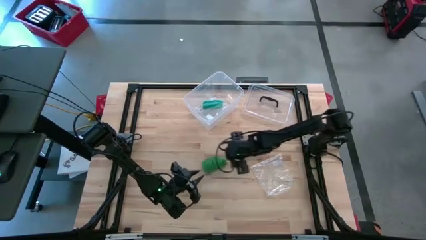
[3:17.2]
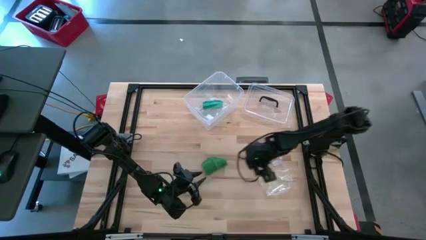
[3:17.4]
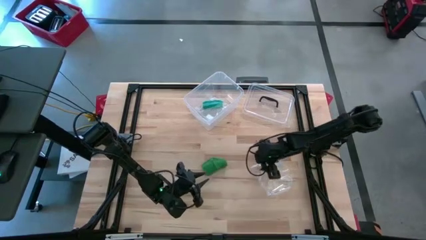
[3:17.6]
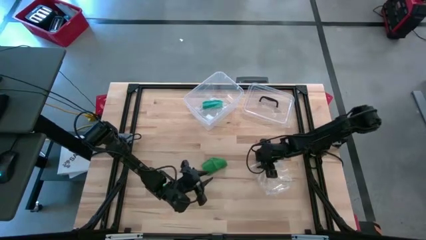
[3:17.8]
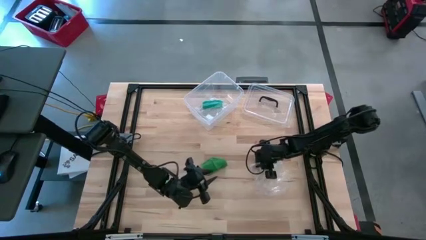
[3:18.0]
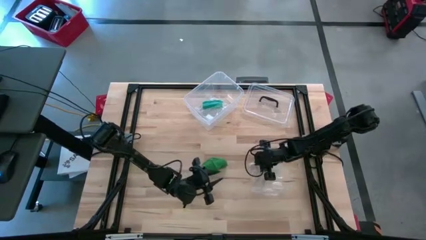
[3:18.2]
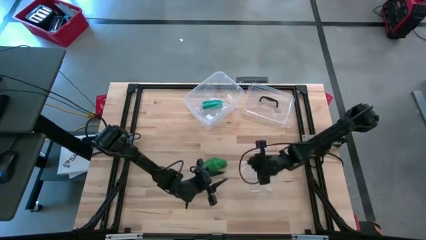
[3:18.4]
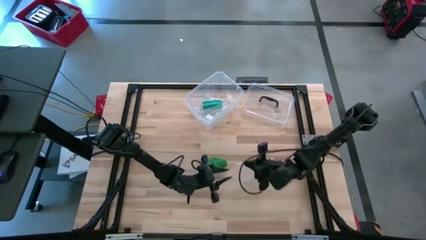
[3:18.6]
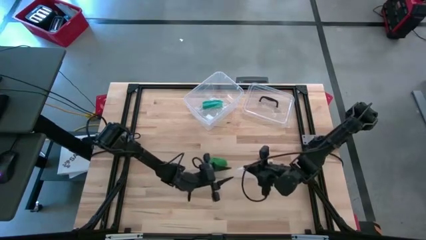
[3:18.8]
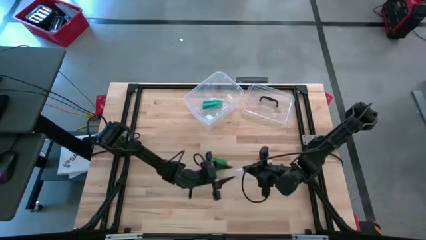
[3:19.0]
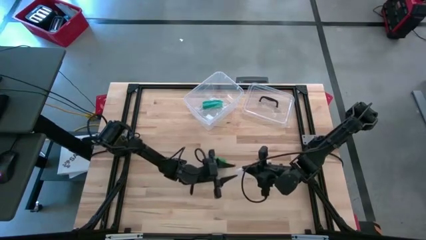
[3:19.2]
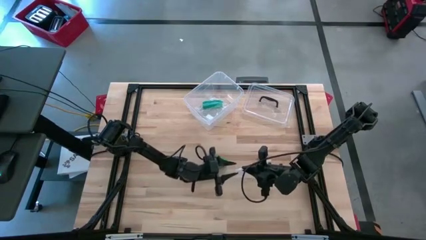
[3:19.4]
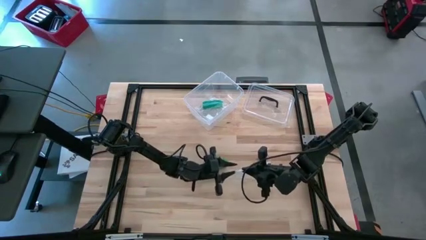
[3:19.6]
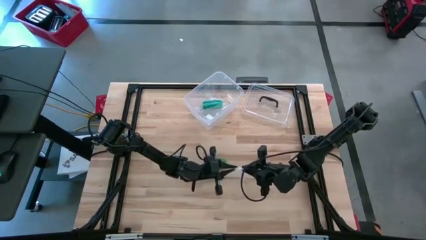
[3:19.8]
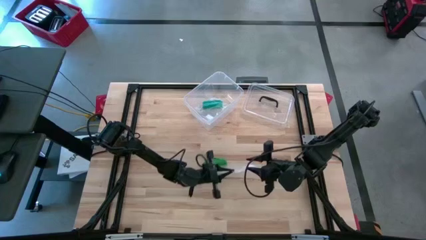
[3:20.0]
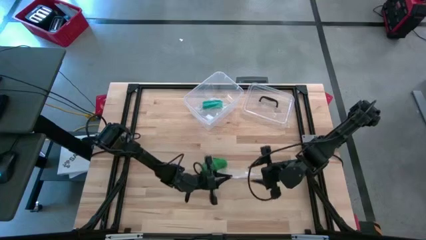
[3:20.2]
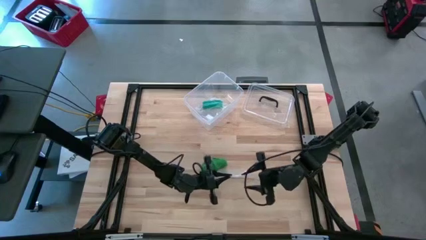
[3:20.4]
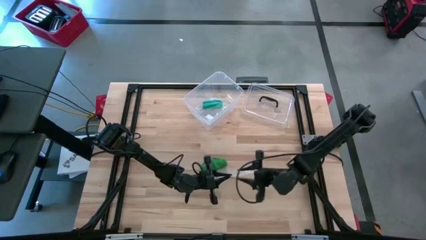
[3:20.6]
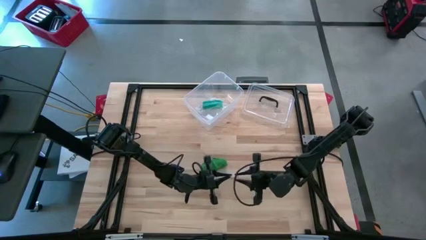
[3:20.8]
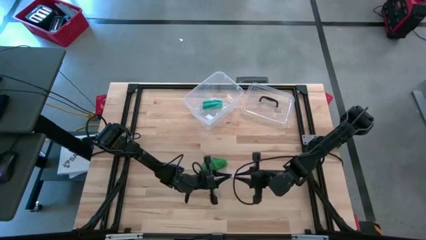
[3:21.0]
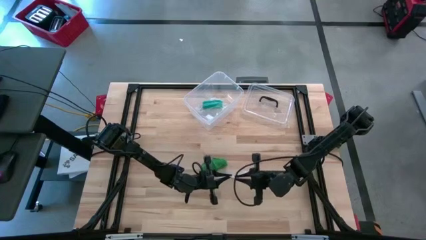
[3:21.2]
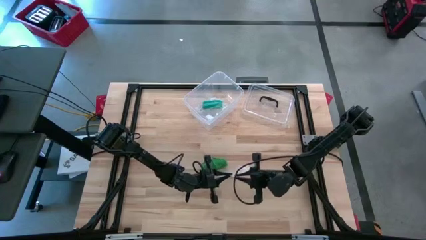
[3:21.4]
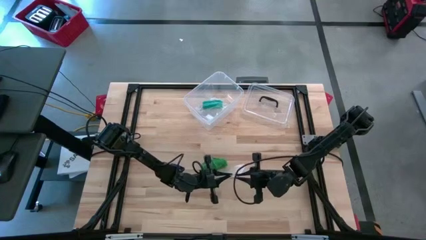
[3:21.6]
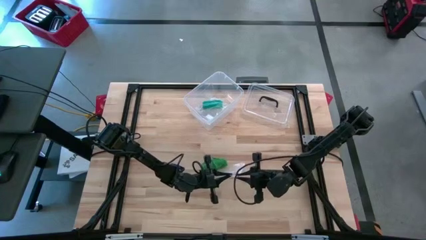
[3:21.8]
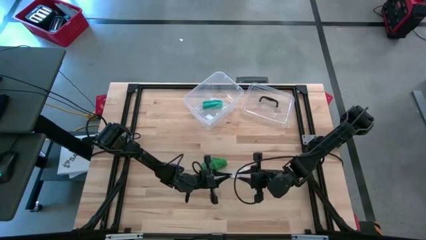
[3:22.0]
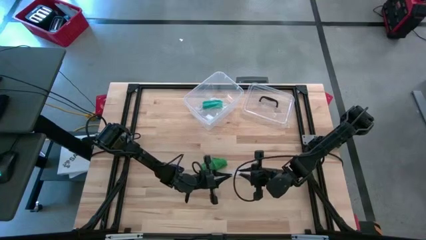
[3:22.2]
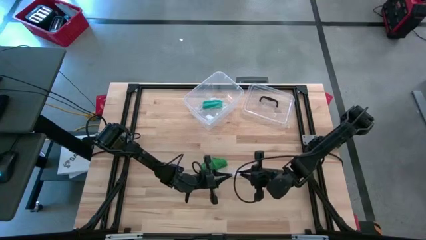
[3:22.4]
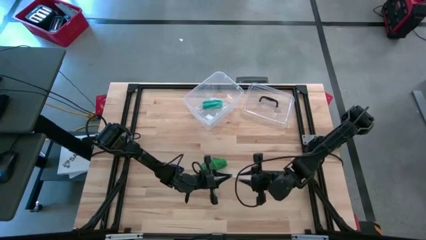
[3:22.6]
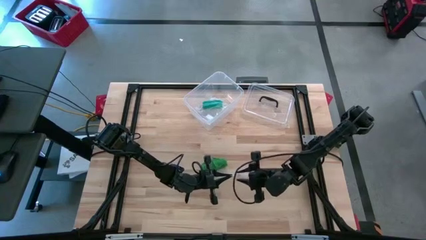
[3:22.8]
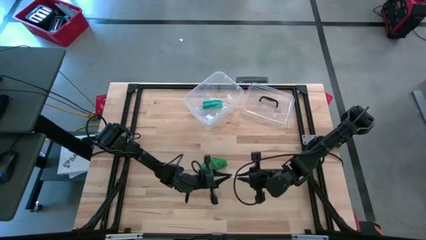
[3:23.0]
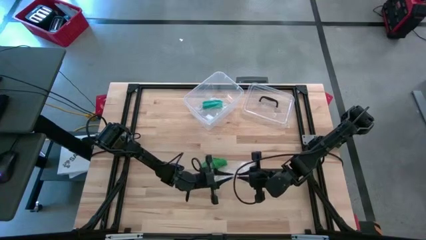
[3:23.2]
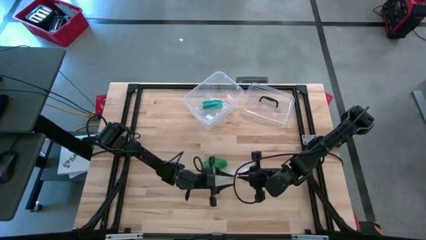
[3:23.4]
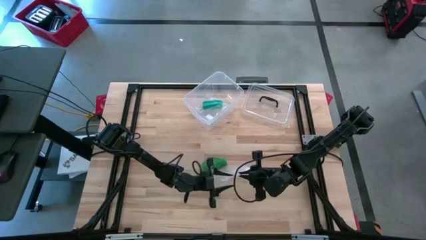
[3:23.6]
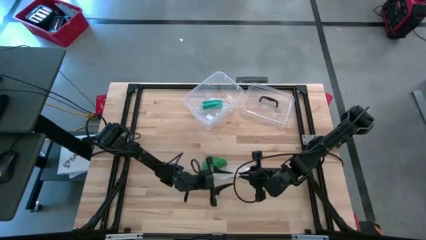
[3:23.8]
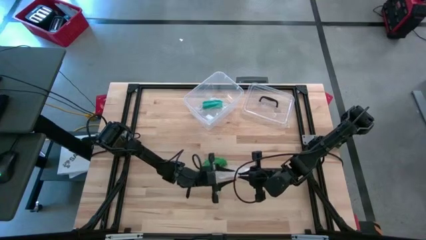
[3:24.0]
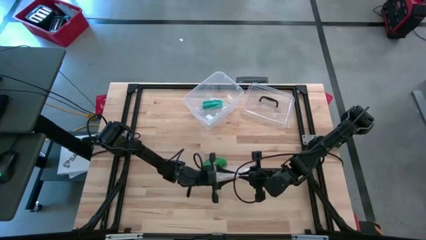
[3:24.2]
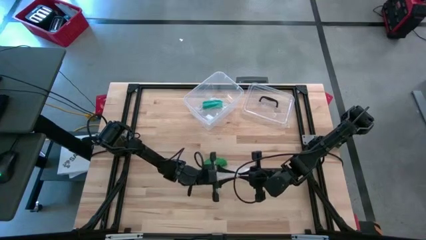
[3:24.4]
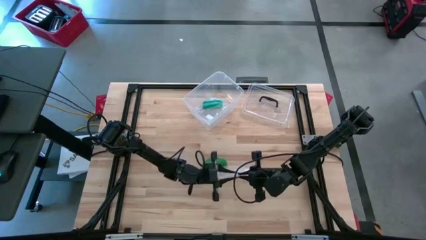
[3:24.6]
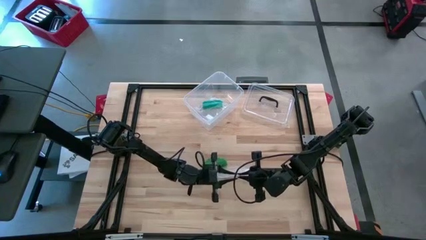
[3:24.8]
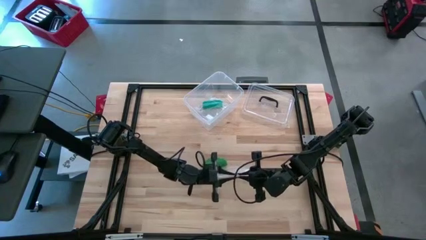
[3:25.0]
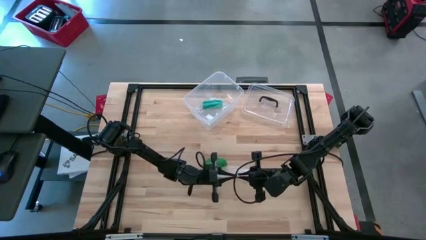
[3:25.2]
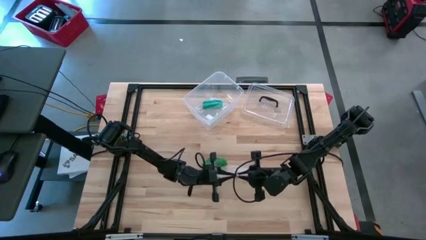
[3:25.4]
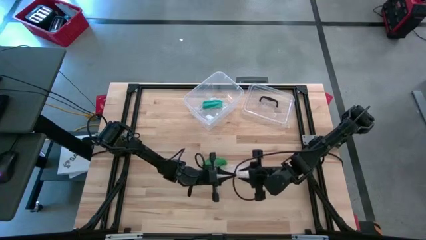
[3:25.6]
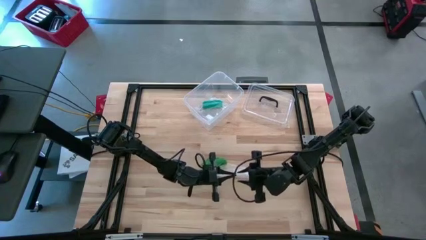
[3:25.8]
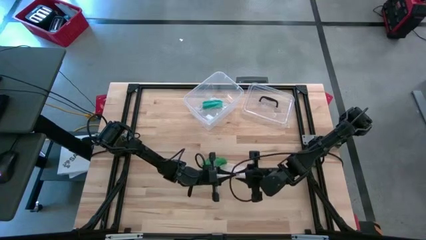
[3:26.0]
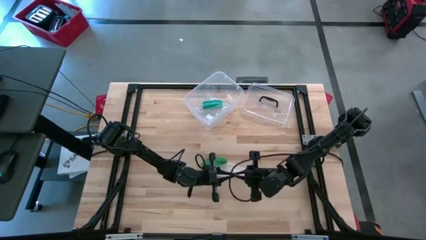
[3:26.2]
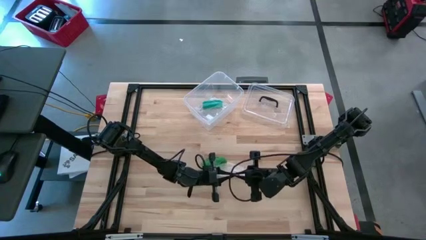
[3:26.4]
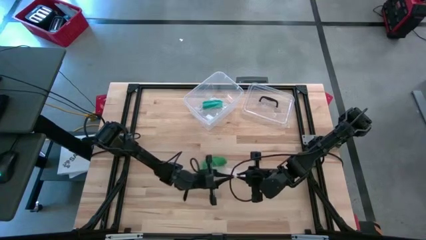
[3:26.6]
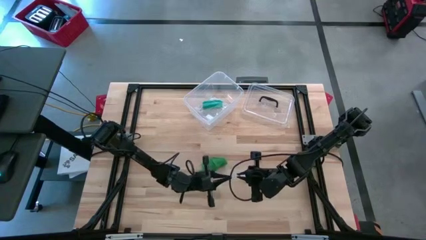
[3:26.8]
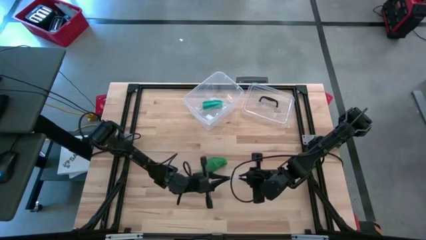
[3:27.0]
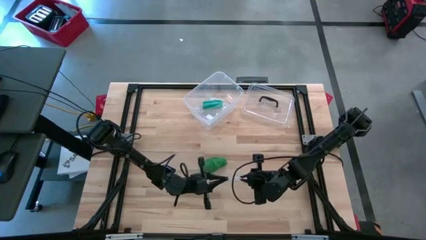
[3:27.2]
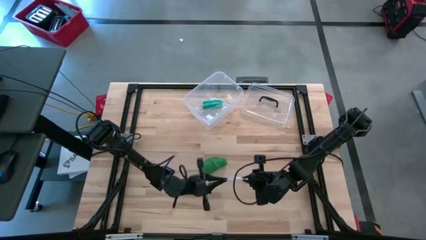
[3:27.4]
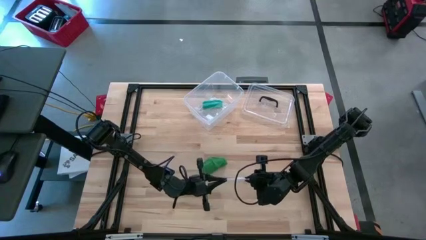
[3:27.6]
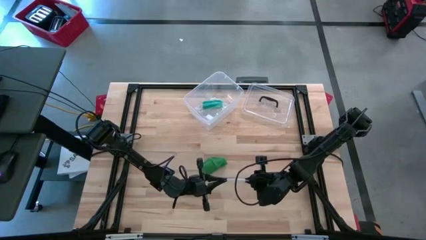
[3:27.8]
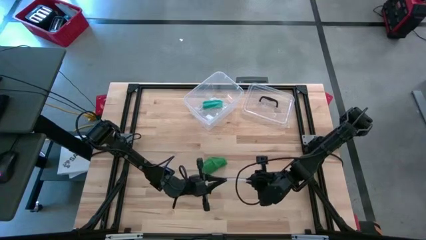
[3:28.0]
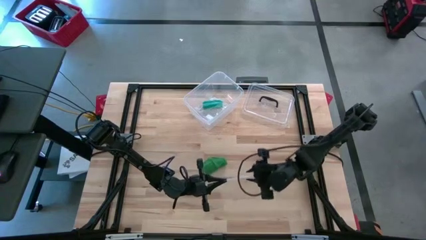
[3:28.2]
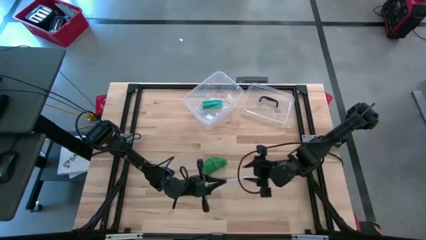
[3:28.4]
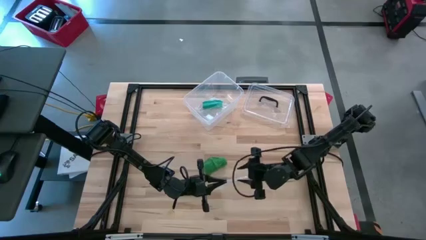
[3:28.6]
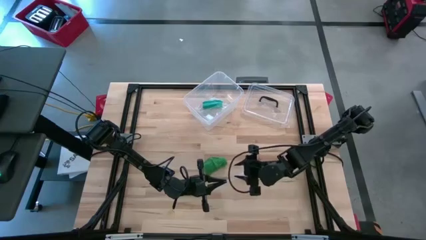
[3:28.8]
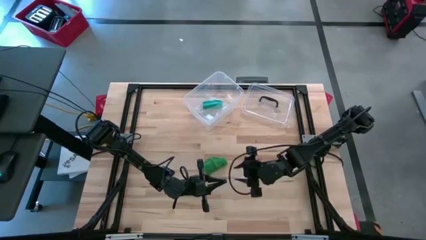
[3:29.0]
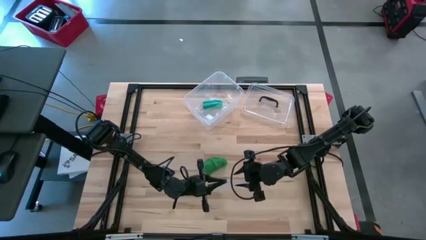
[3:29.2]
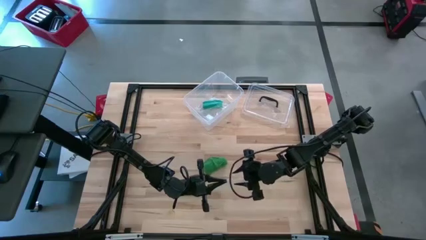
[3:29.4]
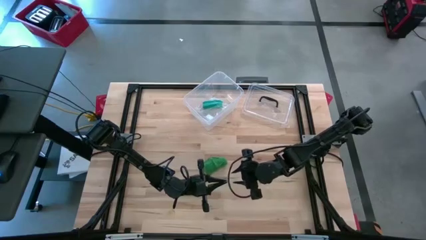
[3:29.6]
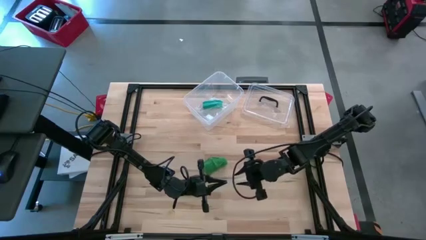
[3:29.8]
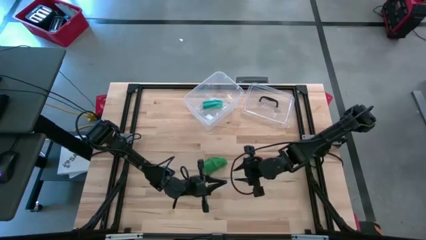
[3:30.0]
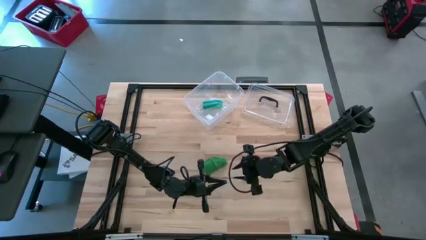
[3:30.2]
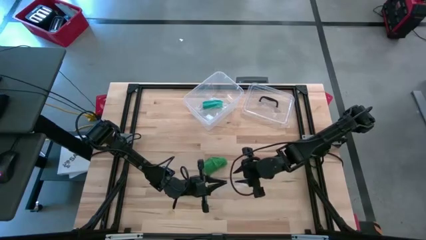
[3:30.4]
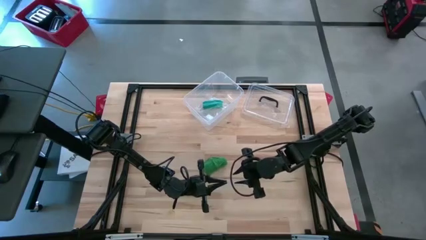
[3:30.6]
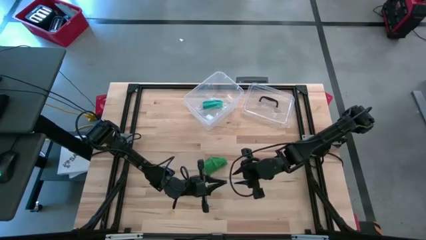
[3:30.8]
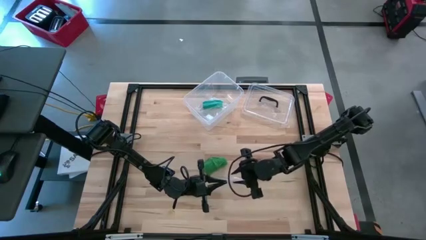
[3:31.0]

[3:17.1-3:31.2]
Task: Roll bandage
Open the transparent zip bag

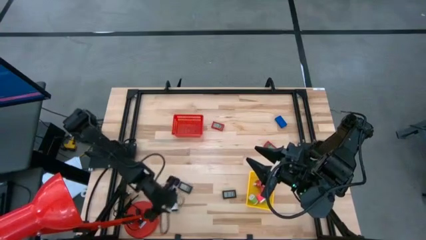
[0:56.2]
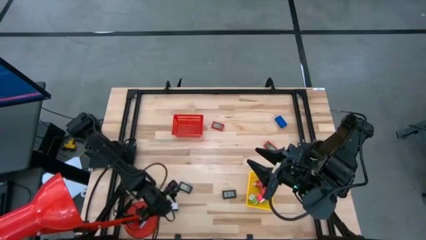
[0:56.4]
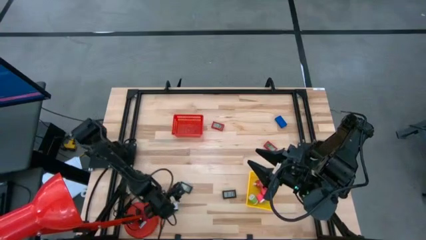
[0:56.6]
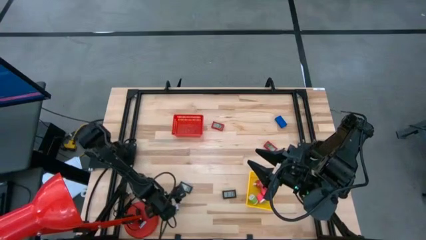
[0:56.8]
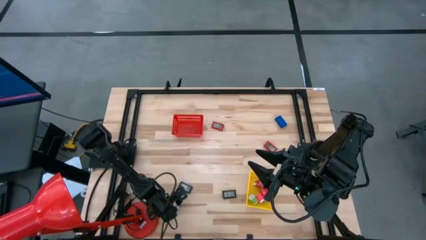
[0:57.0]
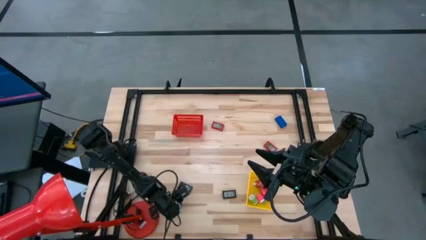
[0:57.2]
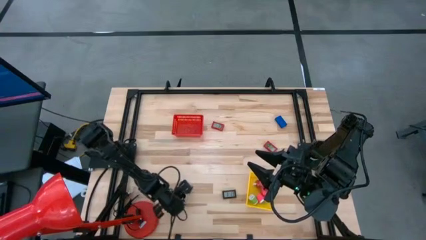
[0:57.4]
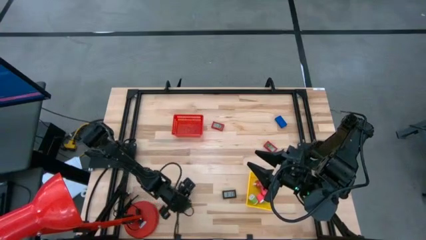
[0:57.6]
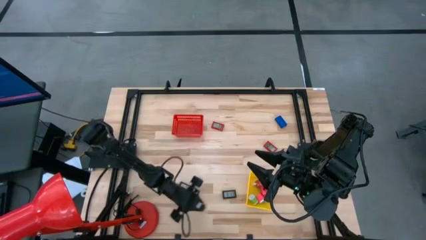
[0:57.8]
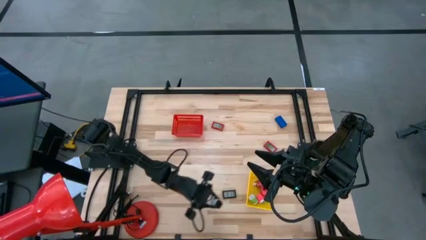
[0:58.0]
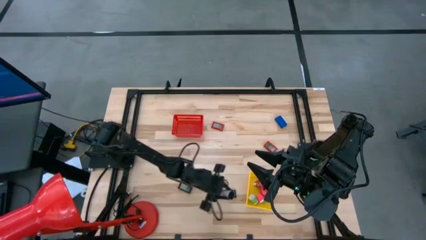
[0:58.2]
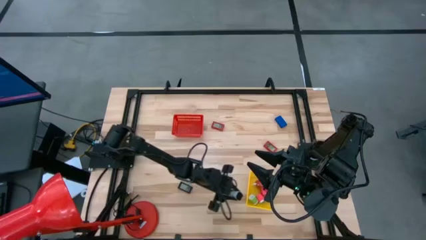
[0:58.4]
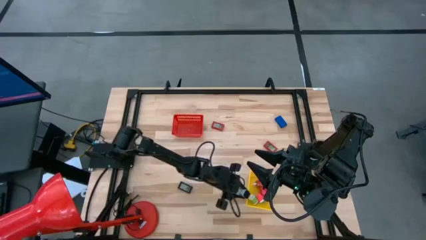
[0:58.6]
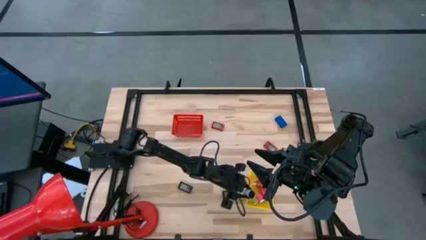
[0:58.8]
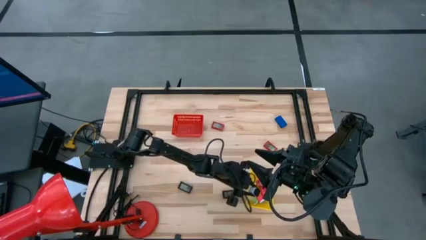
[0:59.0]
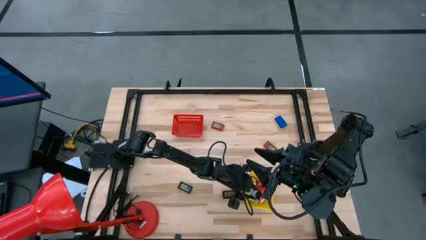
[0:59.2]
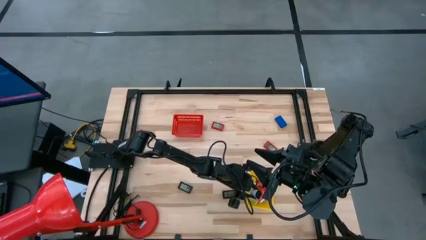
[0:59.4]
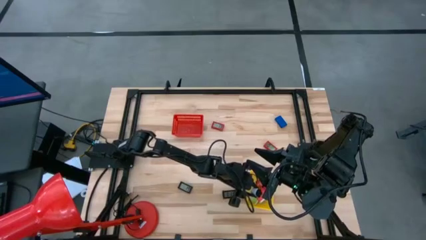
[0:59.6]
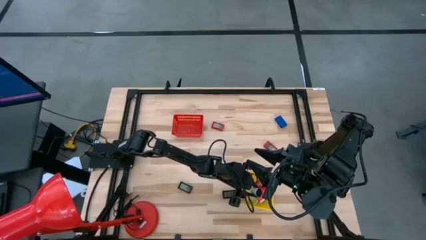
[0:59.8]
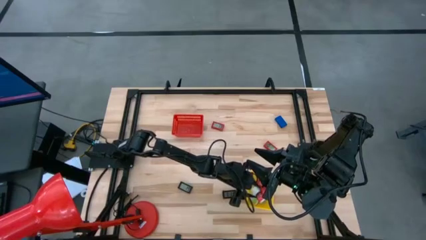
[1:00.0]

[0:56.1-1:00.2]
Task: Pick & Place Office items
Put the white charger adapter into the yellow basket
